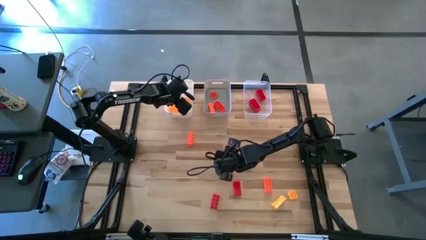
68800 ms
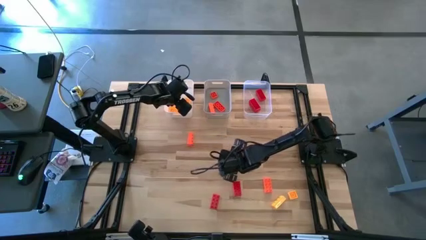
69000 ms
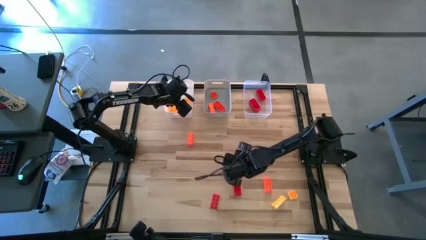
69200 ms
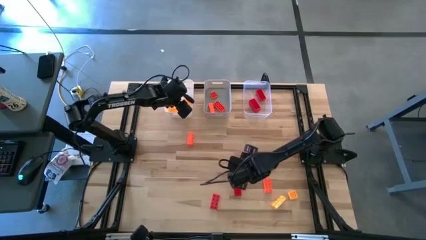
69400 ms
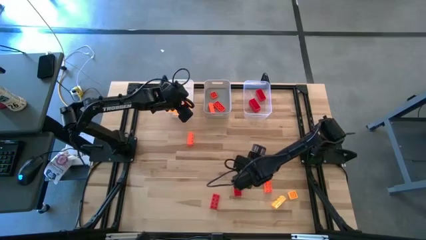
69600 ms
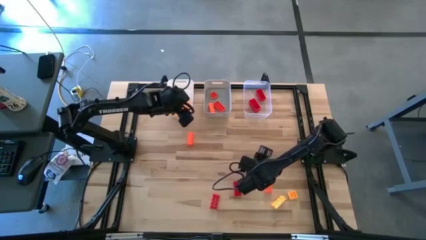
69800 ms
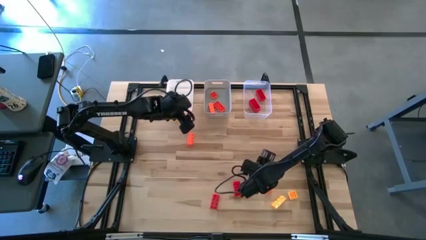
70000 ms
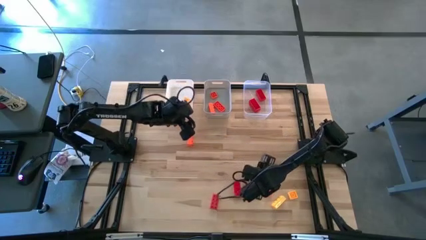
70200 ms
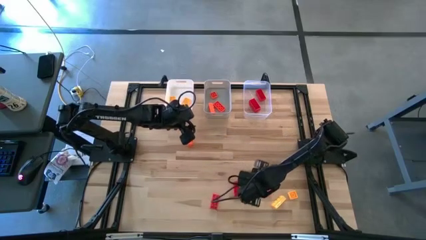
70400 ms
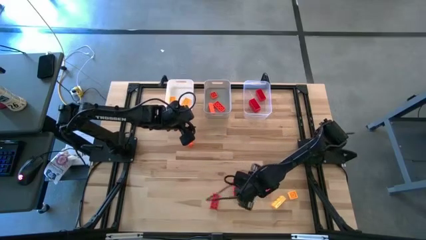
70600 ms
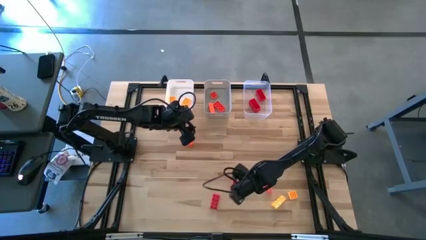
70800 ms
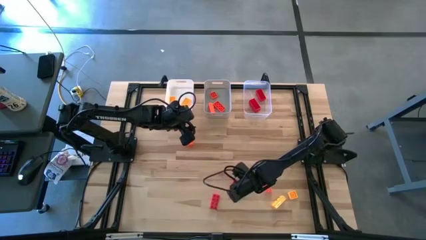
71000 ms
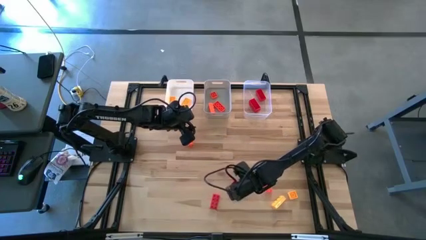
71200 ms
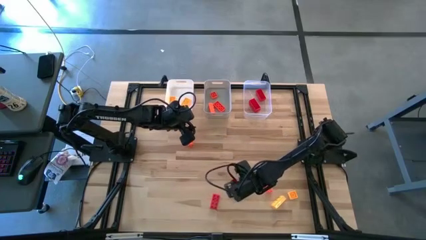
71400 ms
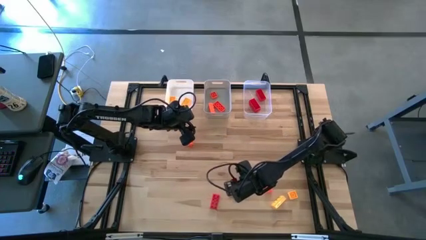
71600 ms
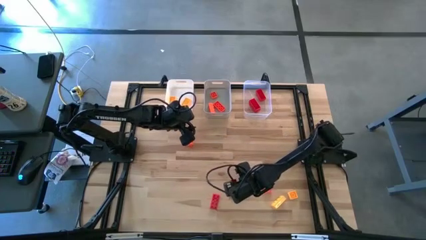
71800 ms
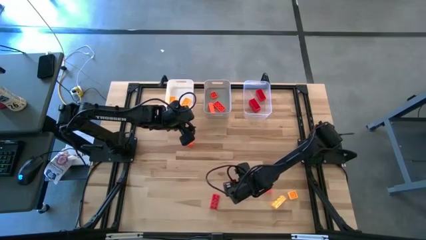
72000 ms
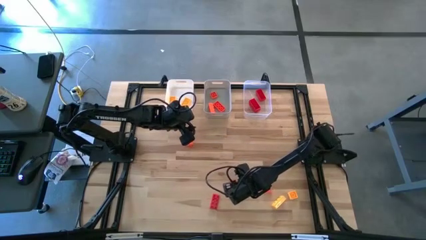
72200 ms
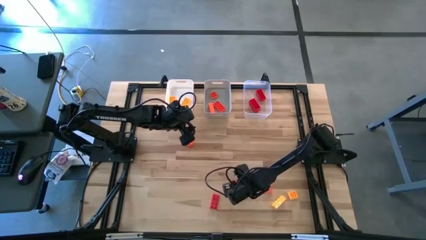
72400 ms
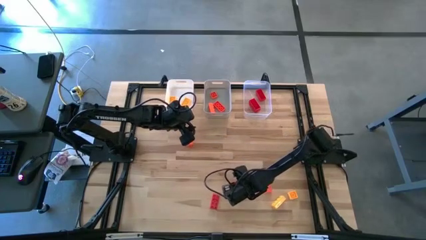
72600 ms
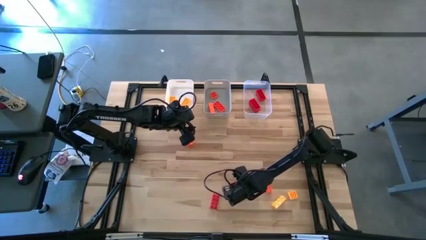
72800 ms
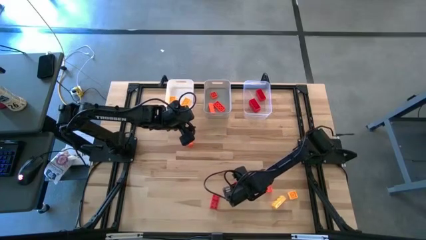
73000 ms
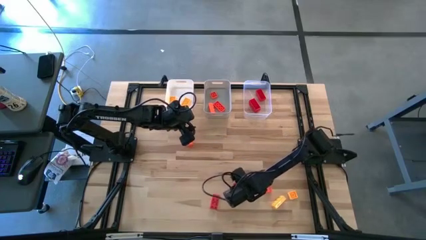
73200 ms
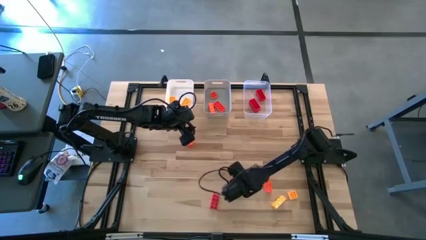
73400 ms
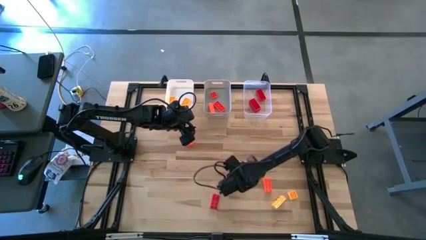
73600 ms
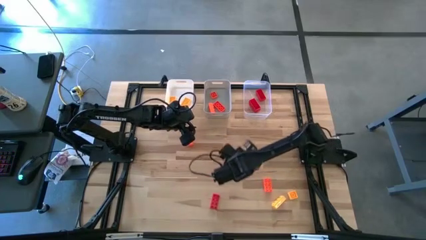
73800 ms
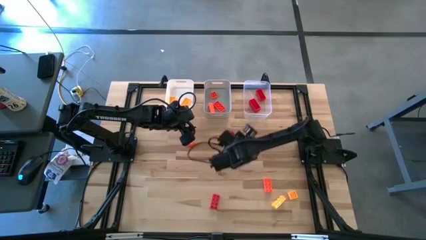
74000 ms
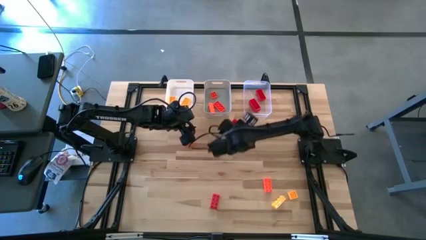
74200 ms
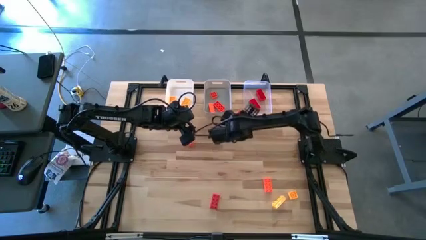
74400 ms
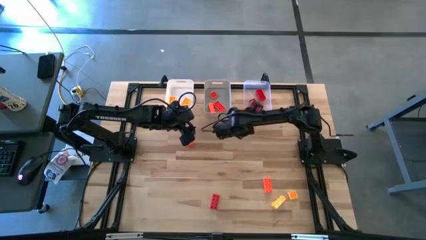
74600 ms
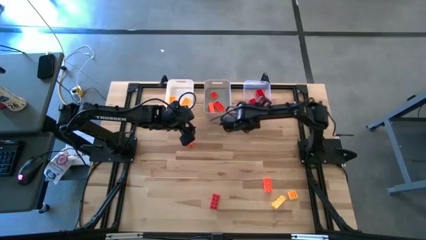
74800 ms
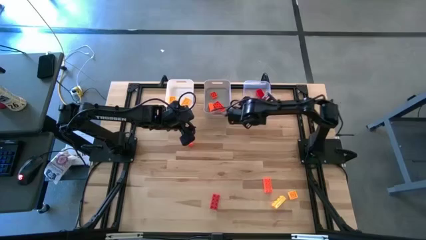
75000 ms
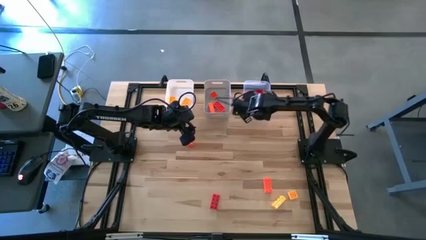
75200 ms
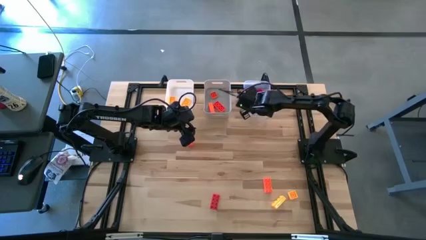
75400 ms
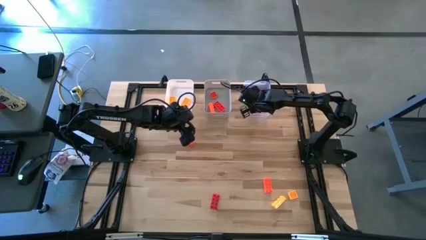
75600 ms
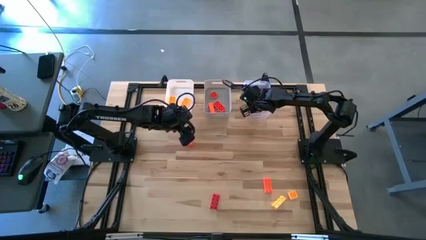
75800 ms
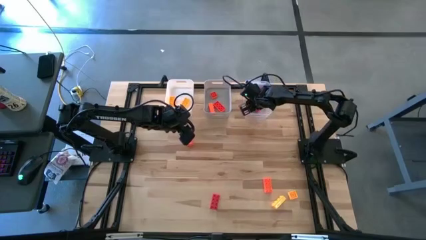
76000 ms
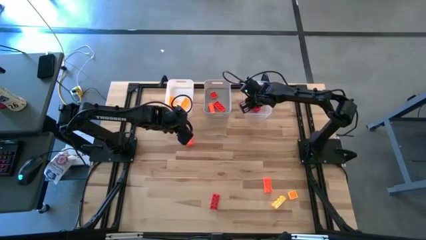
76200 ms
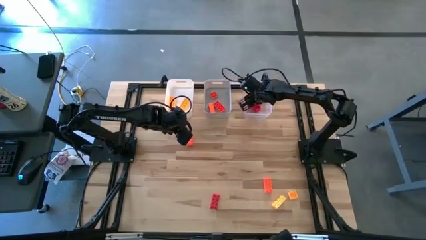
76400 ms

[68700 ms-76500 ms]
Task: Sort & place blocks by color
Put the red game piece into the transparent bin

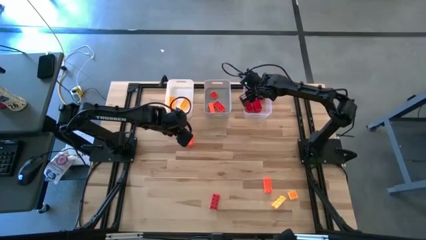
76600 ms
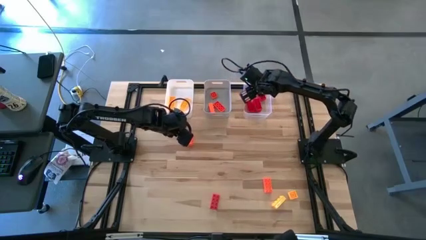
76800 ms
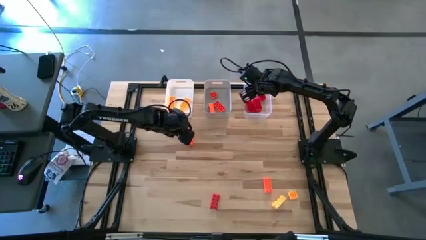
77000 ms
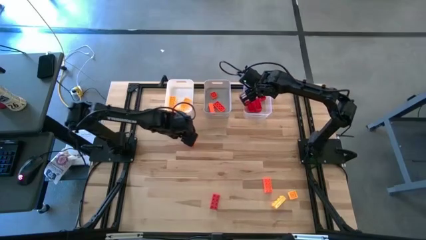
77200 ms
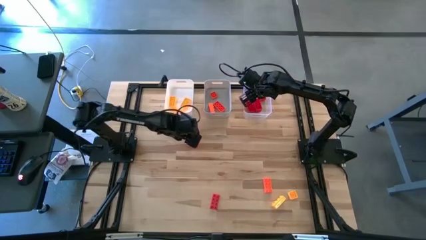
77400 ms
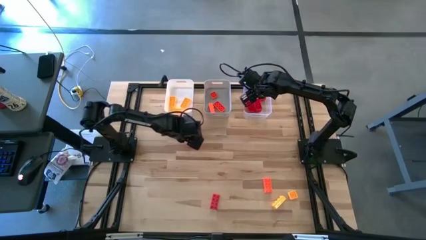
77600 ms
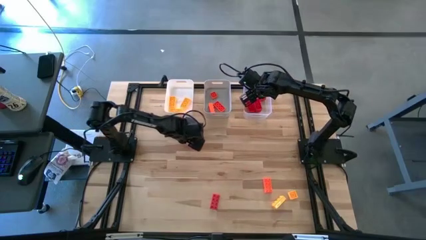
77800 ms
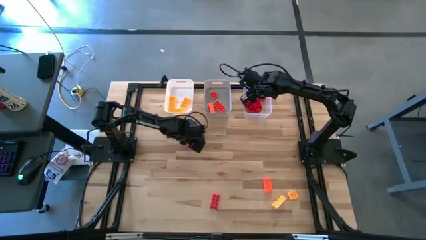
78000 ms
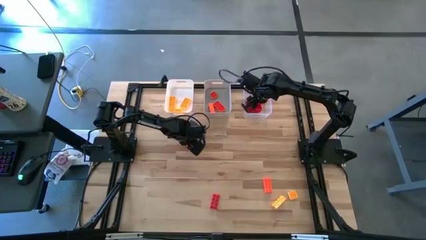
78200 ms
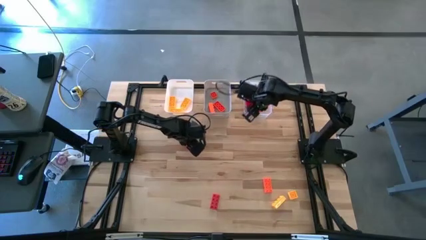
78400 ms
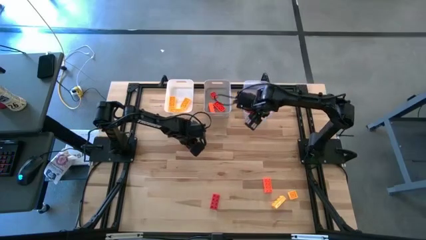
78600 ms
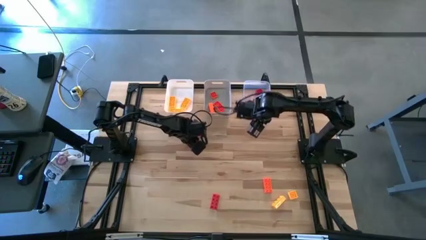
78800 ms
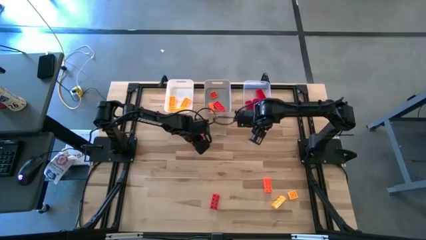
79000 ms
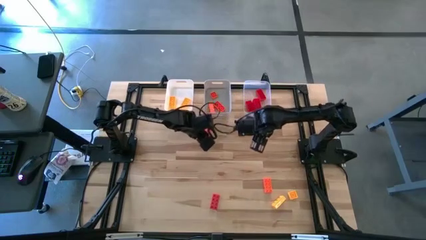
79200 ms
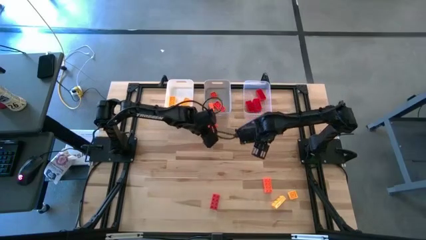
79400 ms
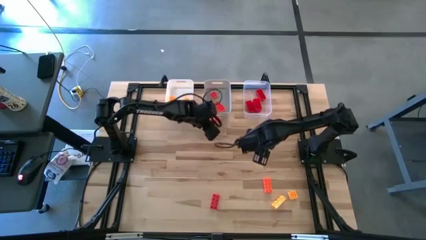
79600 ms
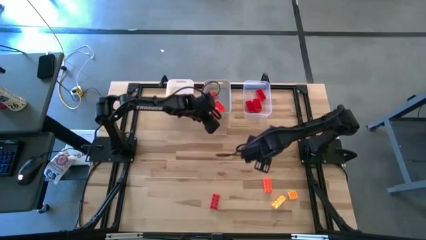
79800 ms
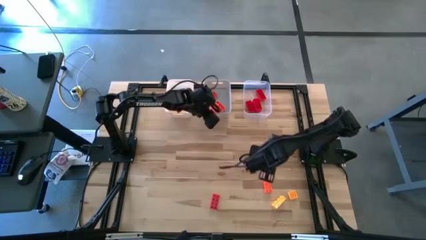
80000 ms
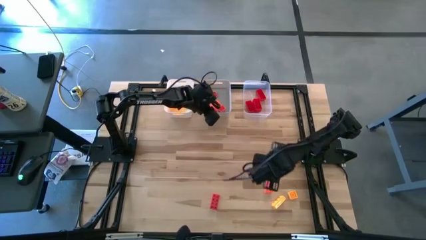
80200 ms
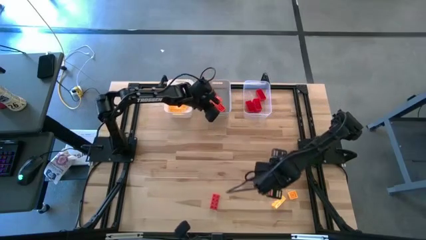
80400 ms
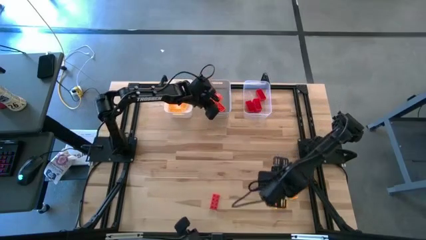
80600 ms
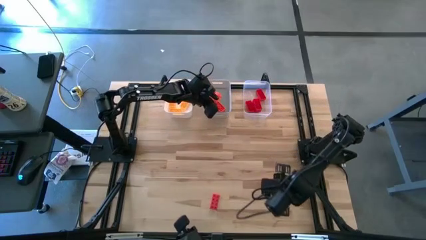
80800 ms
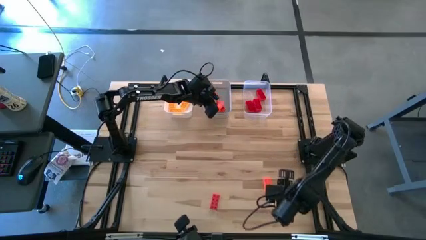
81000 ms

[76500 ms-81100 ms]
Put the orange game piece into the gray bin
